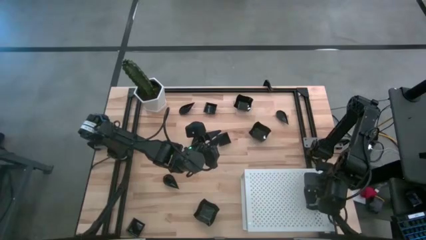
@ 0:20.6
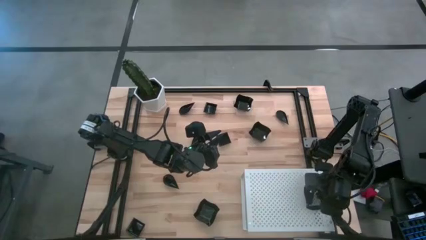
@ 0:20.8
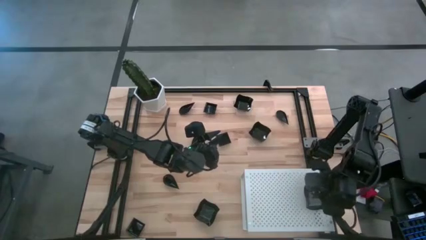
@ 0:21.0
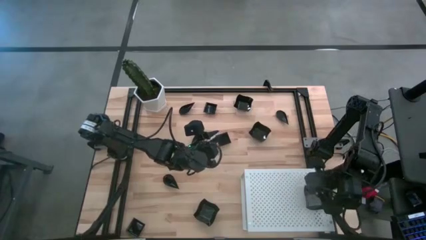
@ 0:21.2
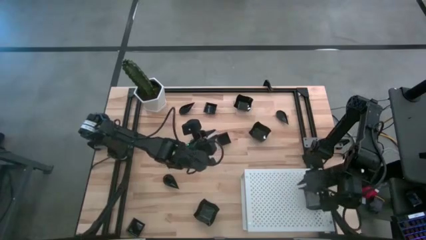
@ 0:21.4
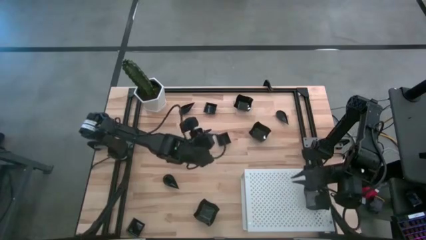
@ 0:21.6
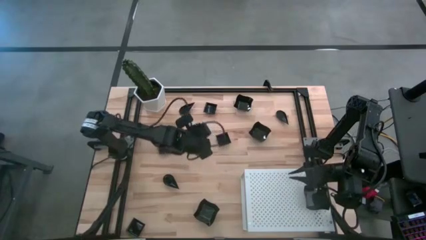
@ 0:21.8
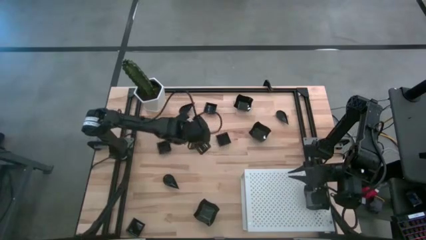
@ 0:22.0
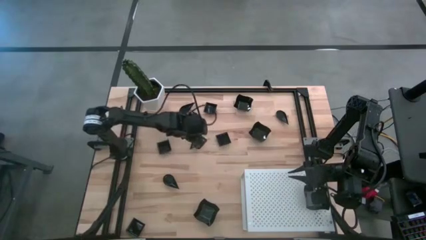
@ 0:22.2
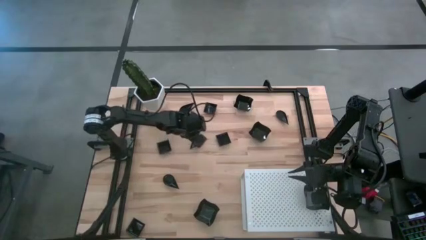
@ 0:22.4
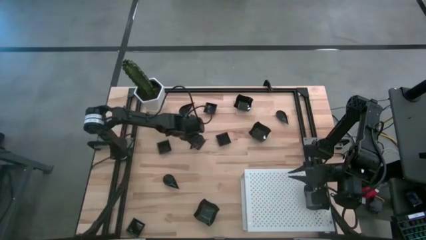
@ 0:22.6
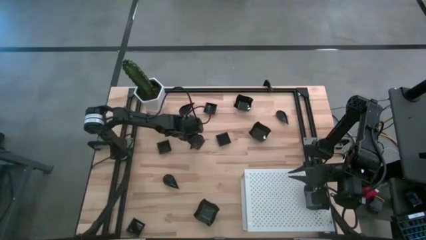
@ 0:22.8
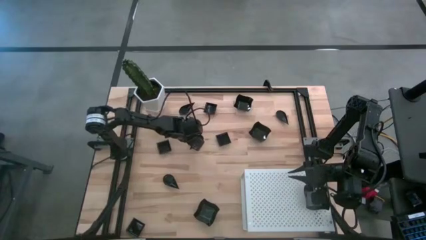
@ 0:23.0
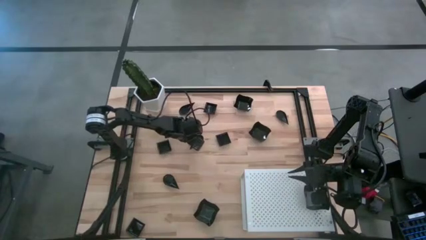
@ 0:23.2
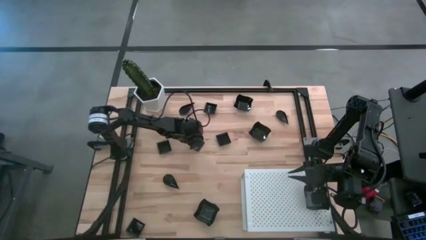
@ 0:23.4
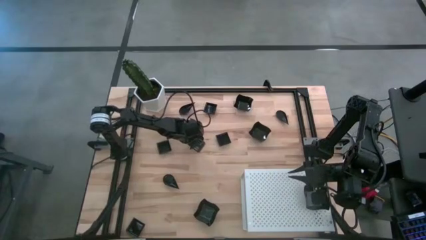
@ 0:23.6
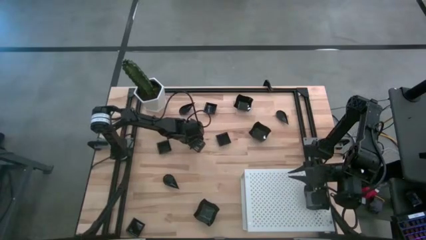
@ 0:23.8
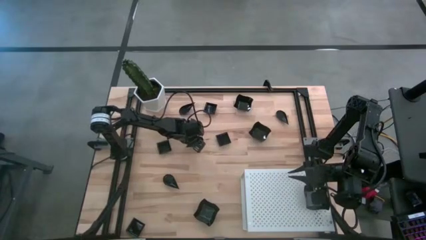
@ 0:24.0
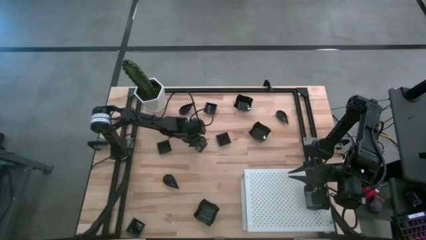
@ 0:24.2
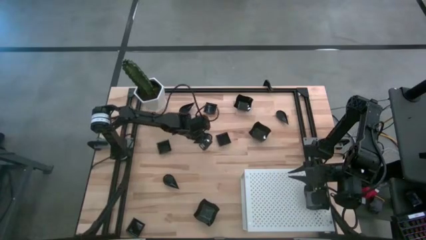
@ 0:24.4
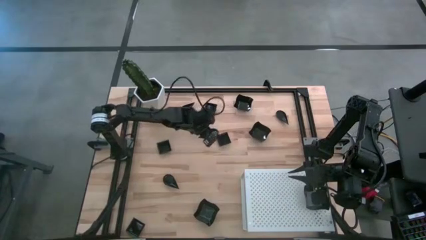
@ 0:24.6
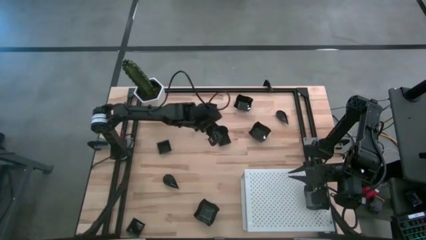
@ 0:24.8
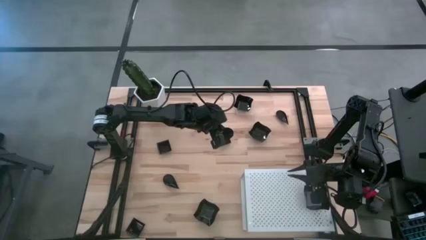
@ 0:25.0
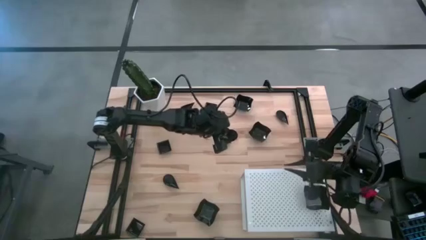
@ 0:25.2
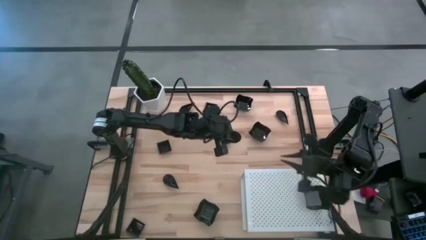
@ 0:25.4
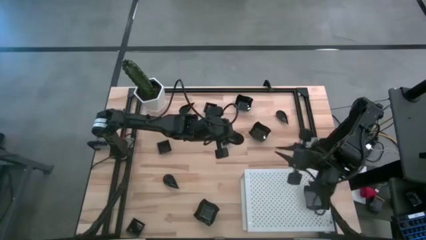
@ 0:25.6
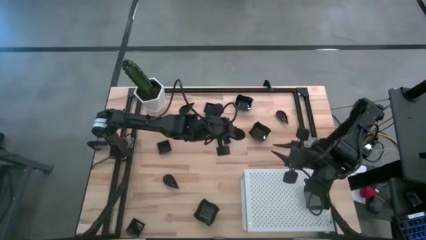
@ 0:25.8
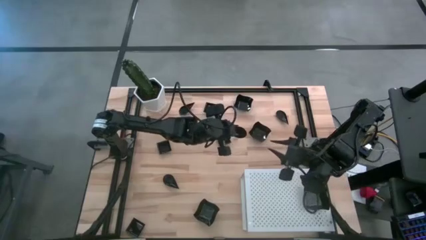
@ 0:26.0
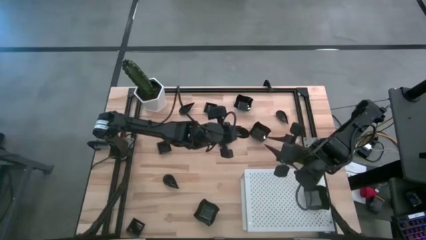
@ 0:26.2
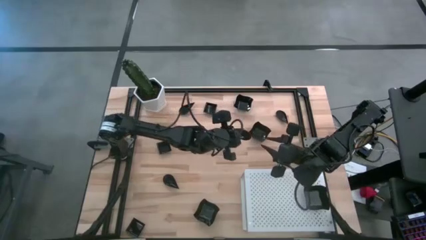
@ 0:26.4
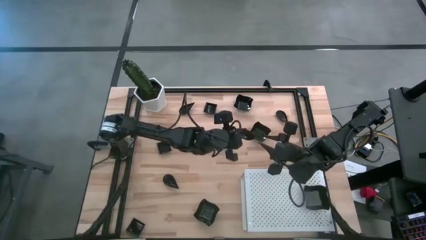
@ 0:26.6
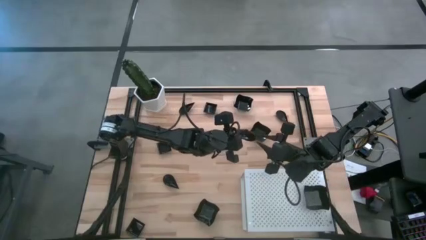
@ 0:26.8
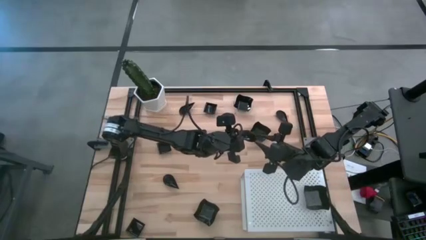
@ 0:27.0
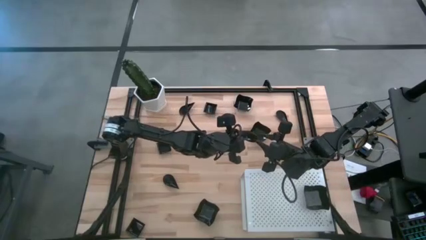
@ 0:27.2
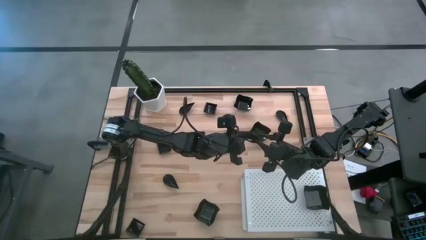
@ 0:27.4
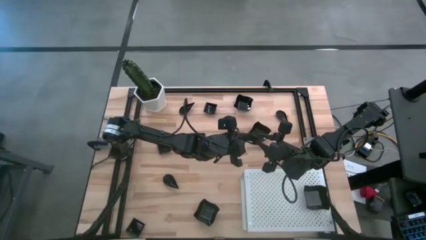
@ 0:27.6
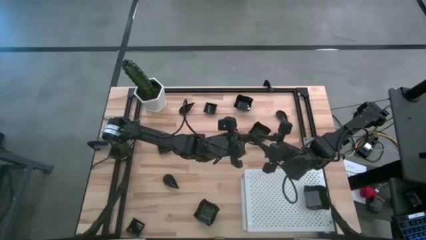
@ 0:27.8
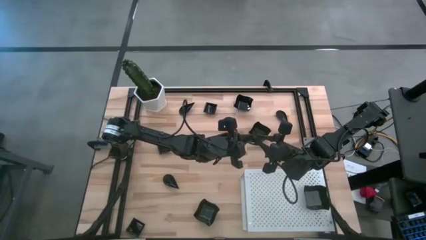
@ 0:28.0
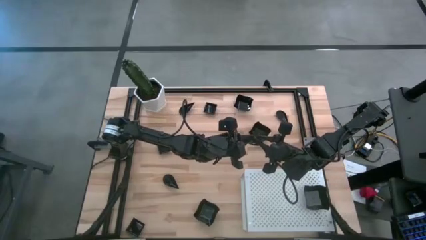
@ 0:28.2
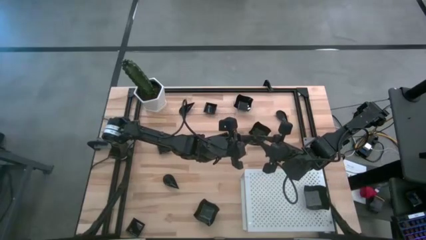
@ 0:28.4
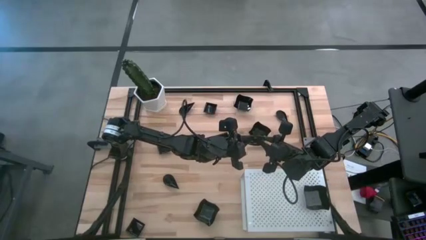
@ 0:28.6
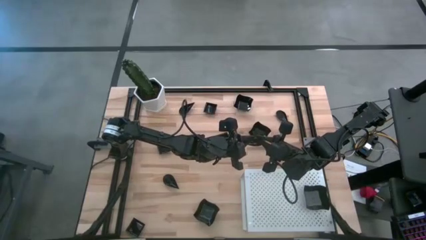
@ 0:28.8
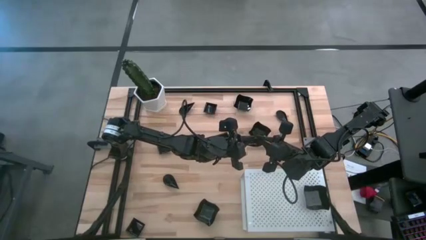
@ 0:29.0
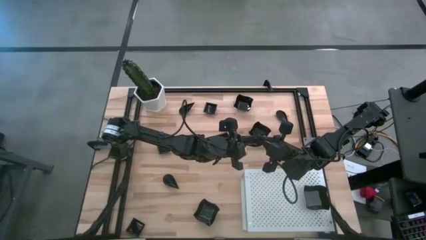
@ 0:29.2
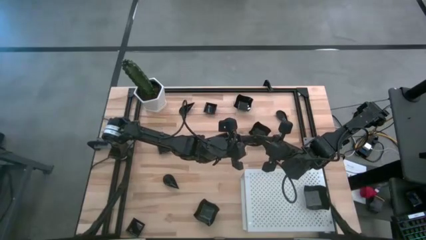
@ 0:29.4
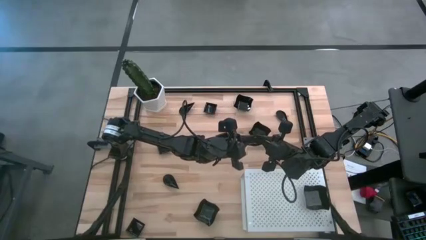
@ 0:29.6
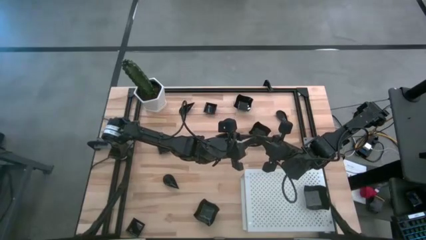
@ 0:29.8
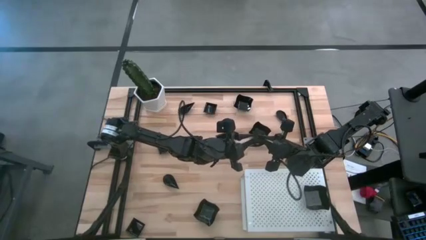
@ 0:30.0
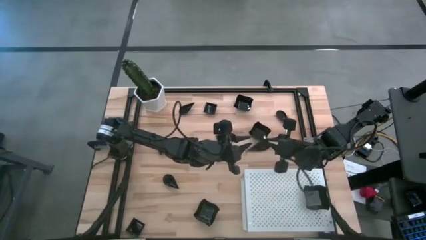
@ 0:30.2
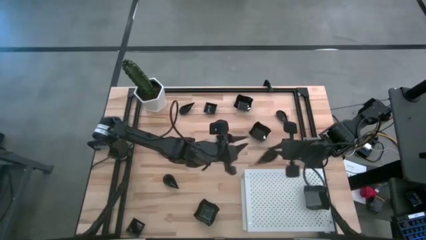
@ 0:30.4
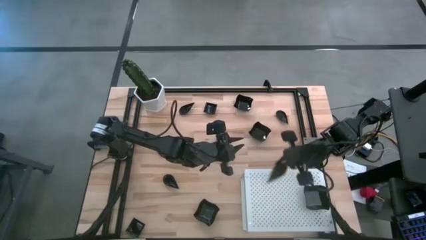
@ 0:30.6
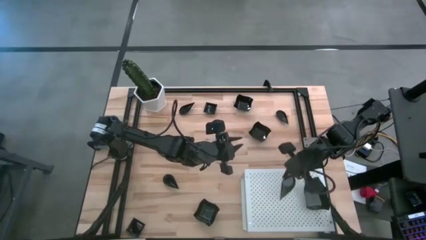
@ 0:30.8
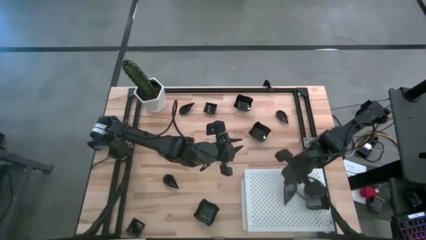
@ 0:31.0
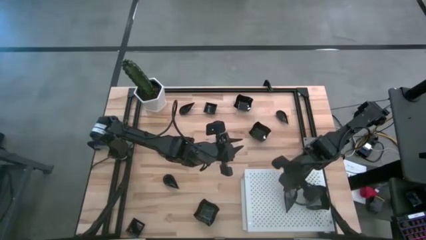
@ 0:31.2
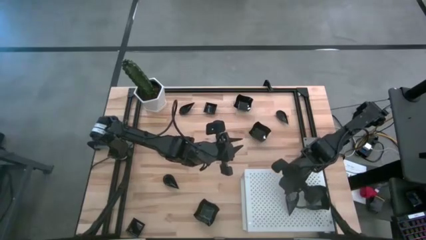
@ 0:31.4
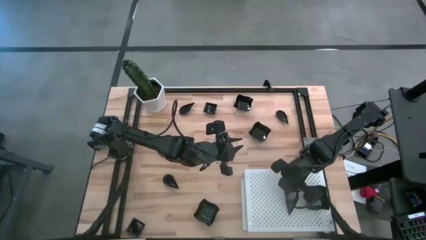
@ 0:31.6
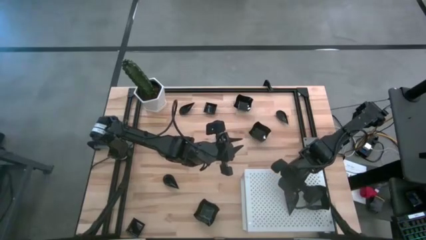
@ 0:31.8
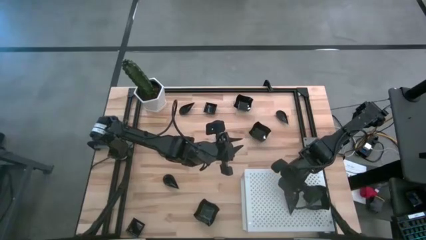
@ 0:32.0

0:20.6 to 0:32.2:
Task: Pick & Place Mini shaped plates
Put the drop-shaped plate on the shelf

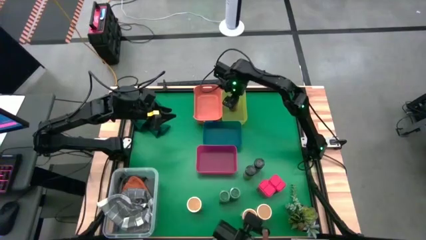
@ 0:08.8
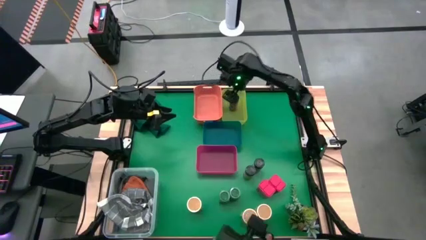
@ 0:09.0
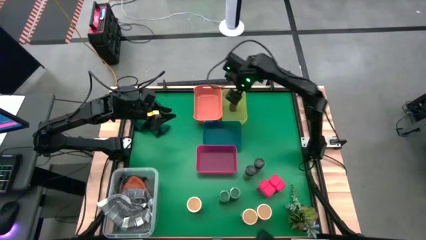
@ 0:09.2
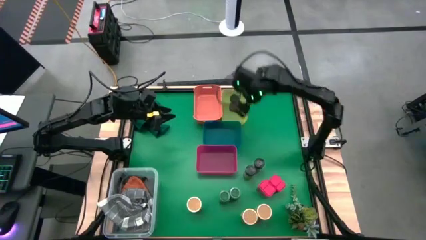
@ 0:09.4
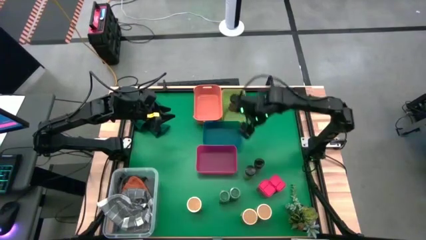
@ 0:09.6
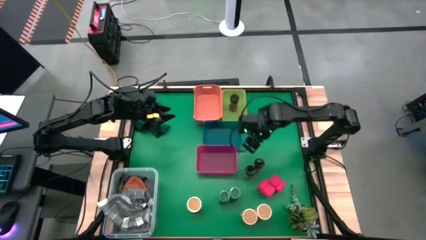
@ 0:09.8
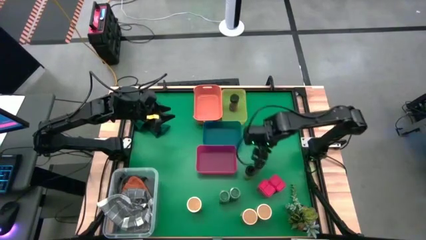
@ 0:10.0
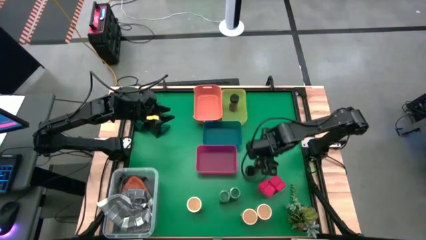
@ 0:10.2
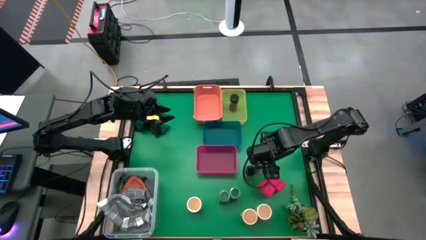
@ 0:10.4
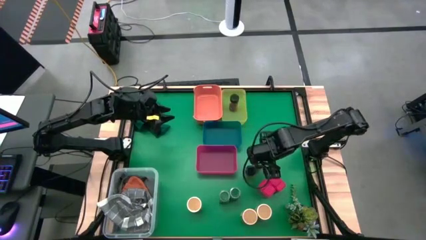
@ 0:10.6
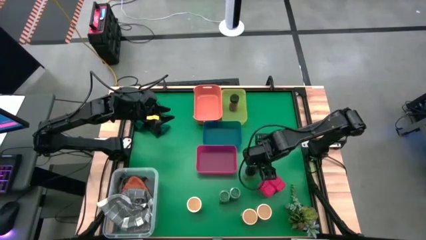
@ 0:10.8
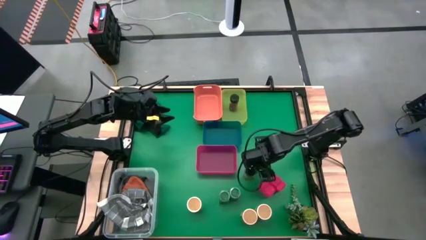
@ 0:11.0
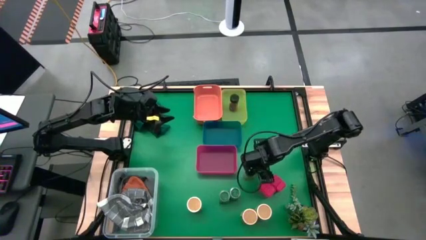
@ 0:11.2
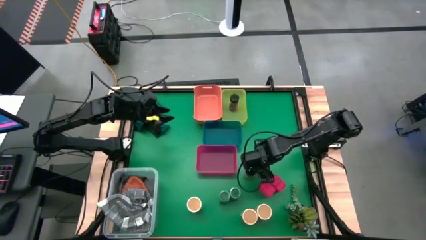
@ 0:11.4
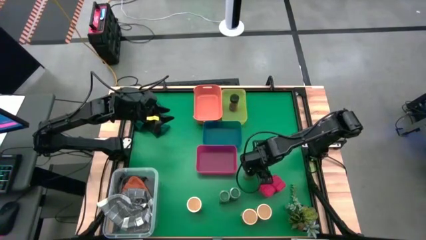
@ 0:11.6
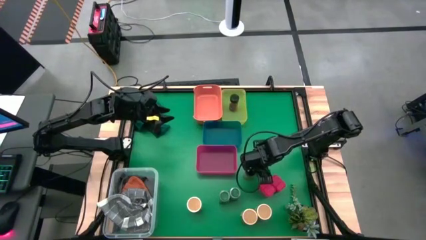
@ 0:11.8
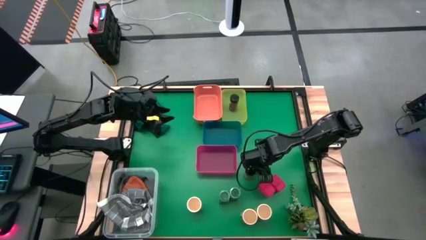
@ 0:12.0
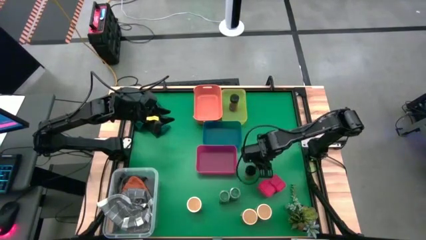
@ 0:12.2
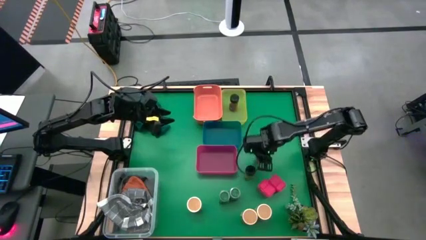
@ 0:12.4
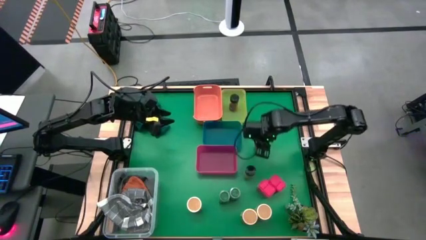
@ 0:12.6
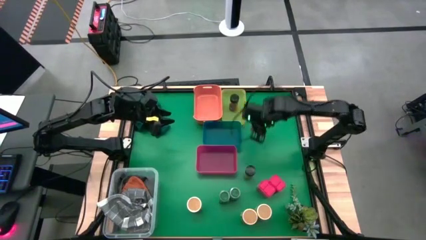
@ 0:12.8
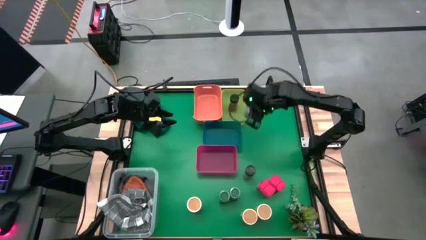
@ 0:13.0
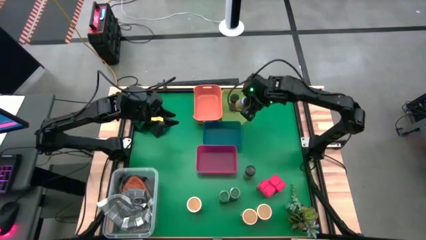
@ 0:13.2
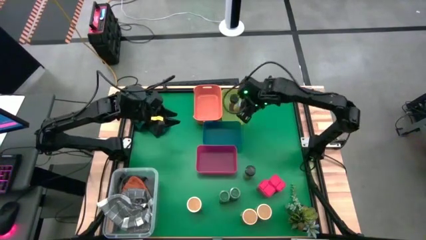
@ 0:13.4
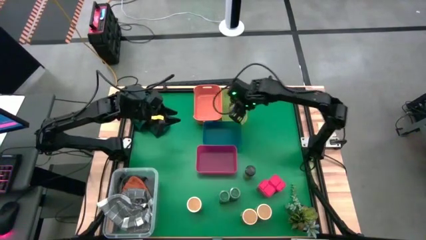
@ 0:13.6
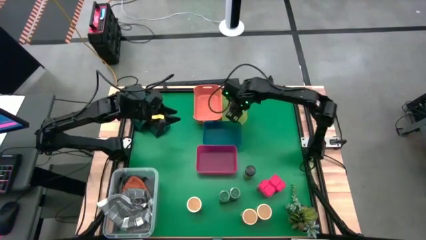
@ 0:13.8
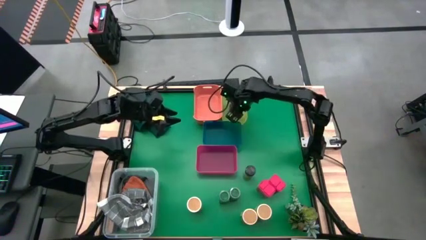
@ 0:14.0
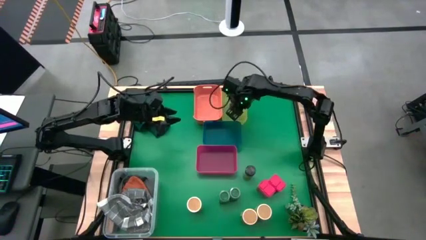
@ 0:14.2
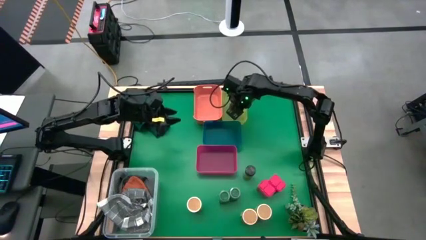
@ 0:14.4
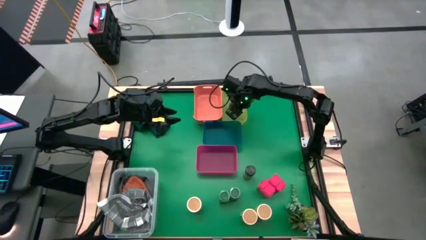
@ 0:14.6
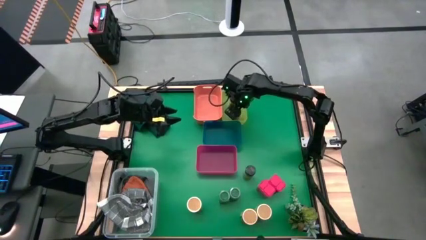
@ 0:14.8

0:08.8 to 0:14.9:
Task: Sort spices by type
Put the right black seasoning bottle into the yellow bin
